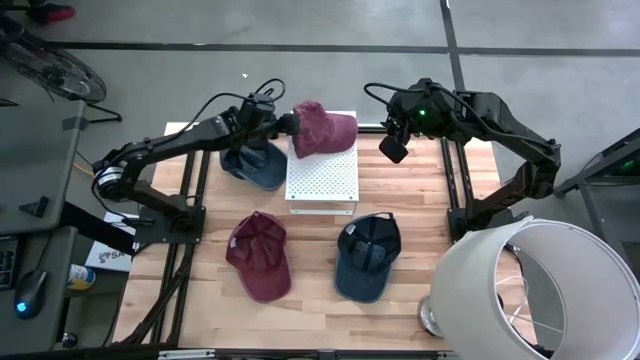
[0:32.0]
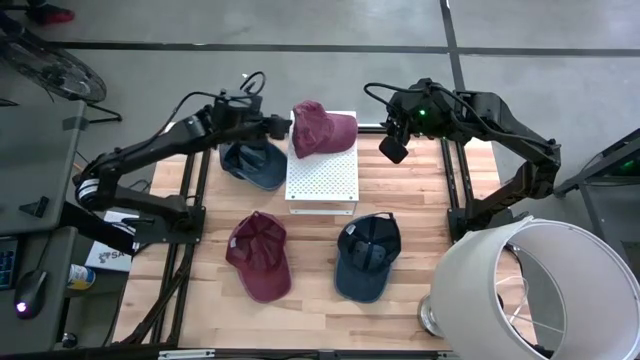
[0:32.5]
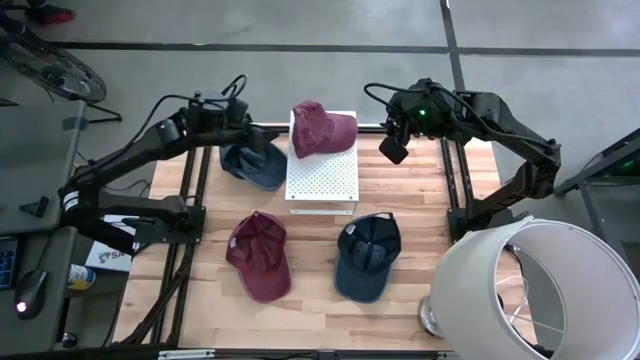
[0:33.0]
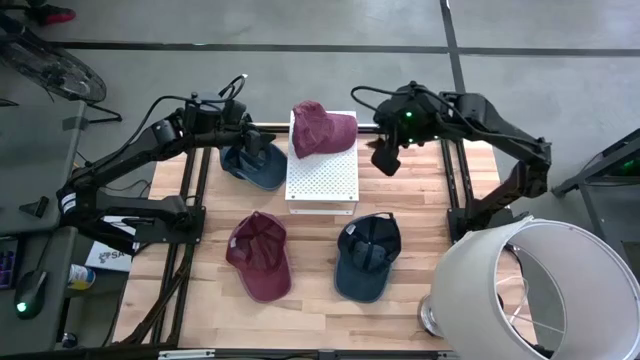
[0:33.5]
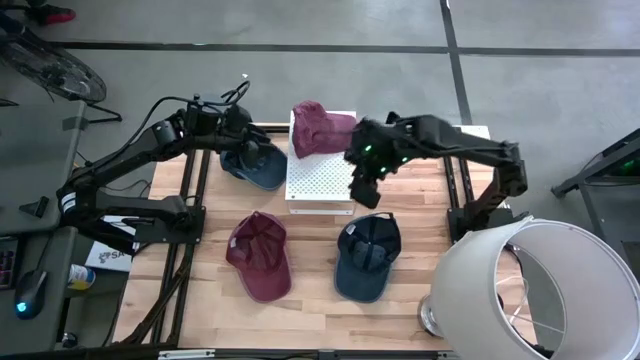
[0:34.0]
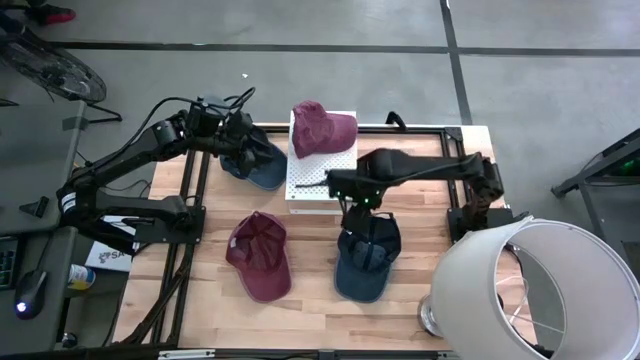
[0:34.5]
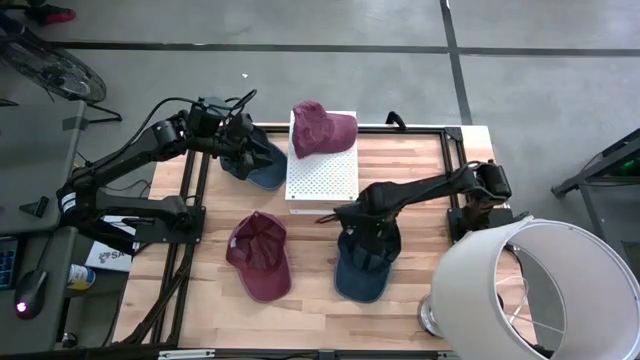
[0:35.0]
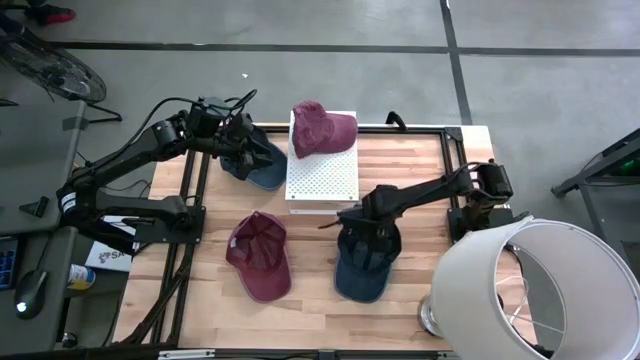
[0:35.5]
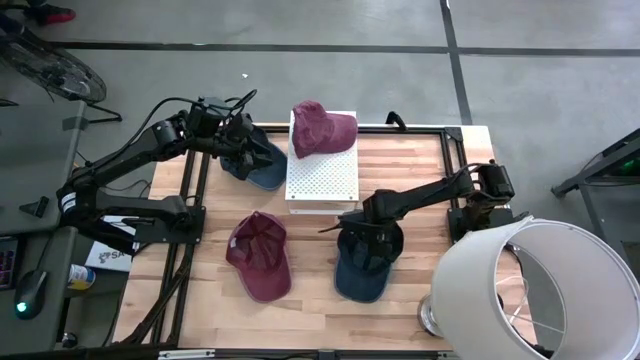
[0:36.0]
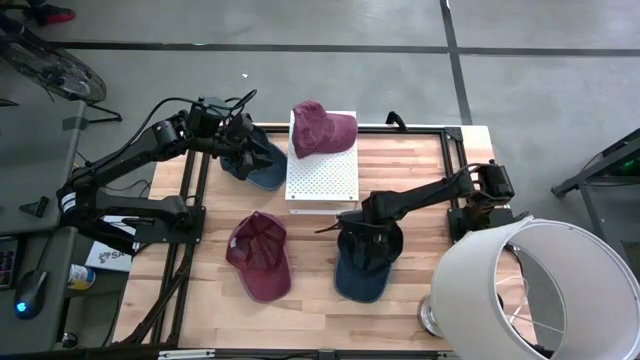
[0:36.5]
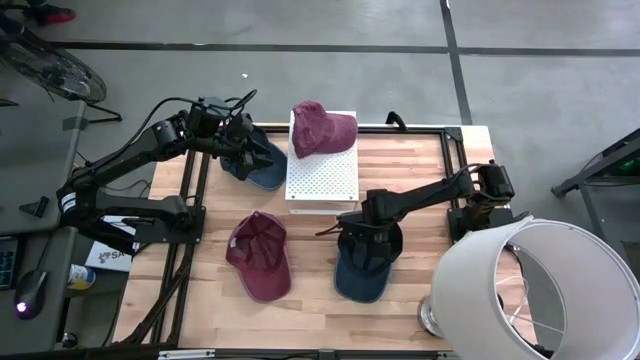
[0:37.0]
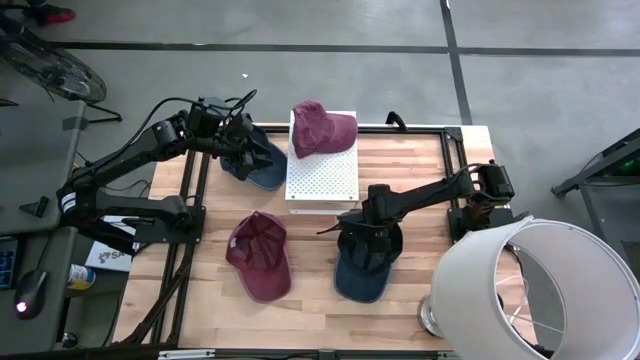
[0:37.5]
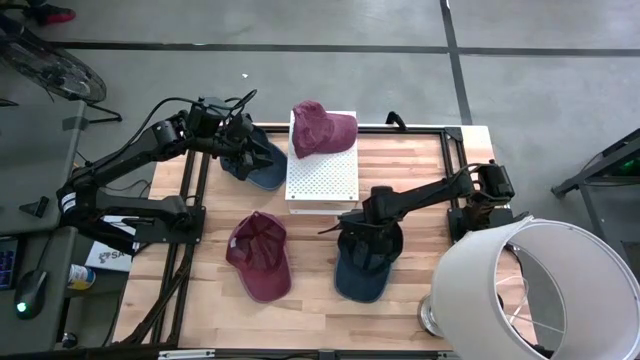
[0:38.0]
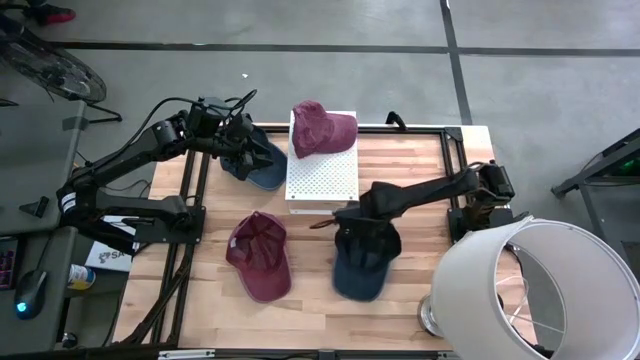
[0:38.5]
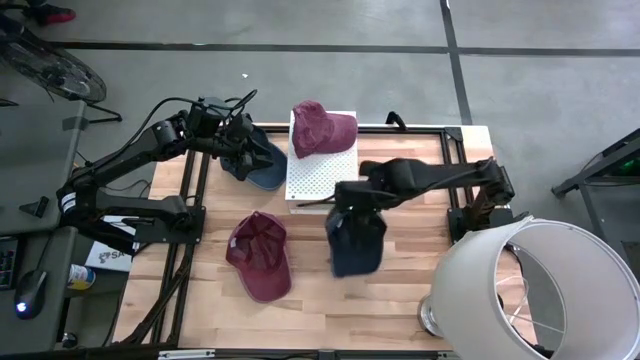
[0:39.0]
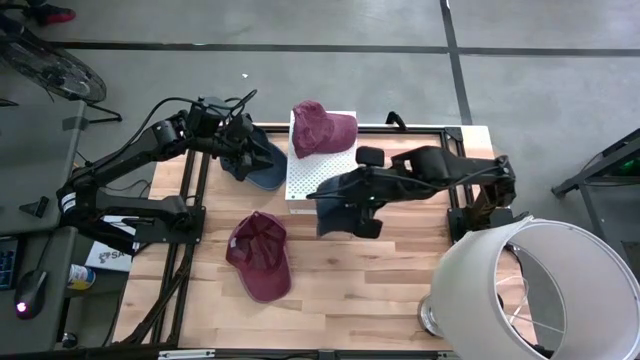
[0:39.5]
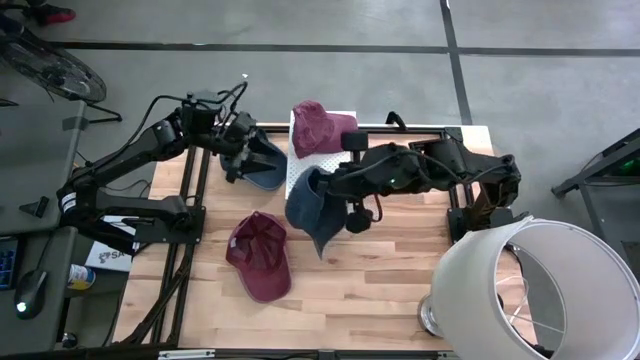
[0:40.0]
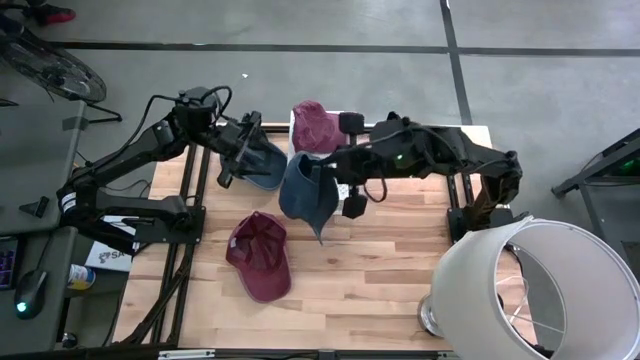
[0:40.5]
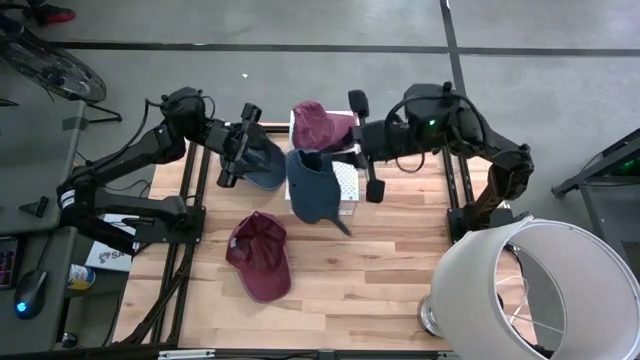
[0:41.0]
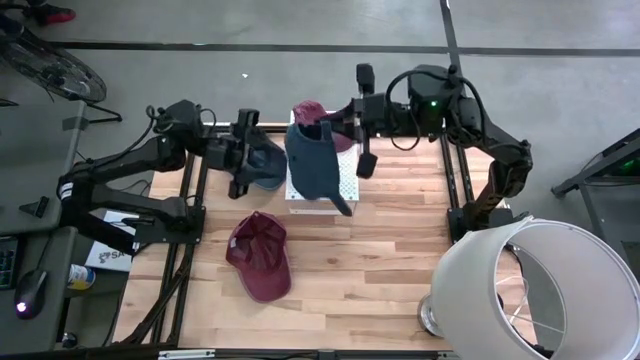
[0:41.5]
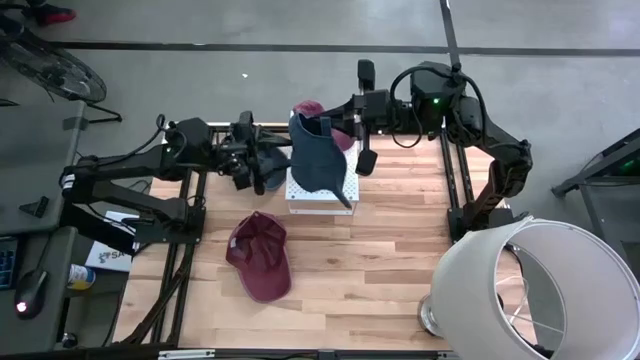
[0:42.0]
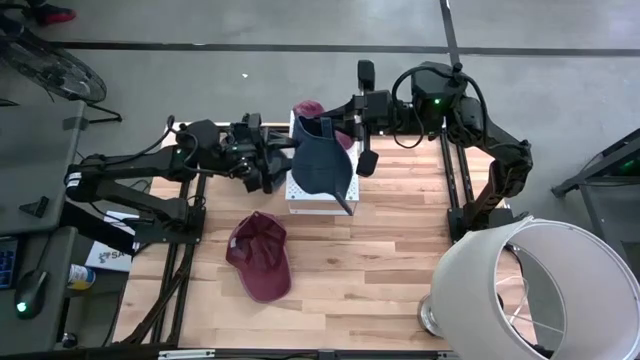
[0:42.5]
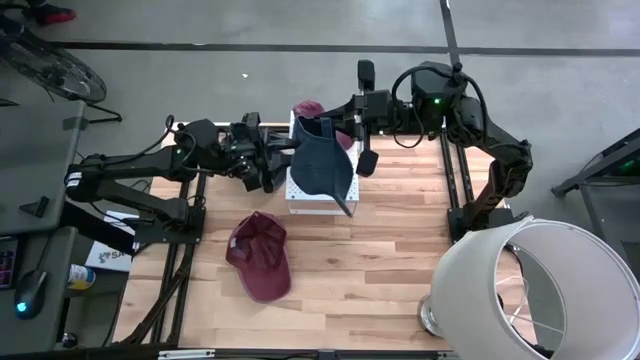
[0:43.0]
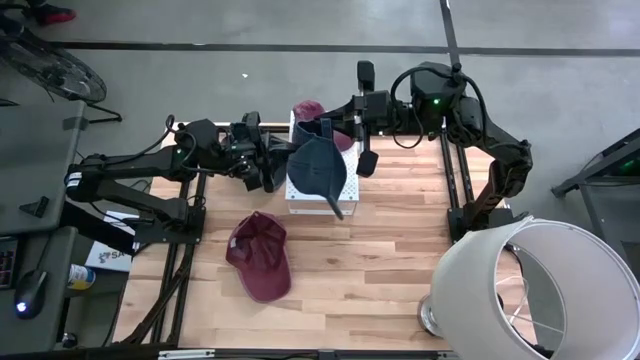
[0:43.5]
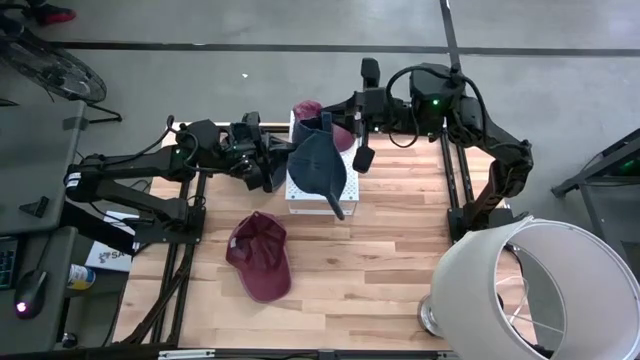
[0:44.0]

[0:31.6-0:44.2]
Task: Pick & Place hat
Put the bottom blue cap on the shelf
